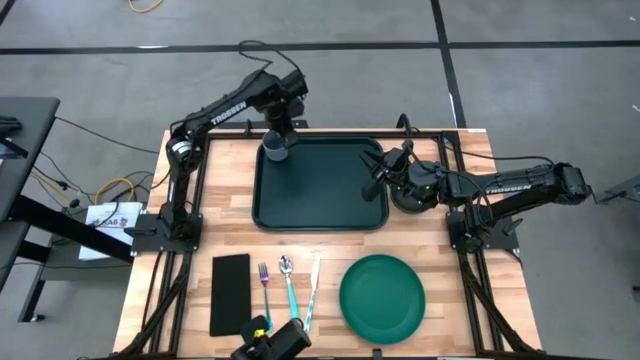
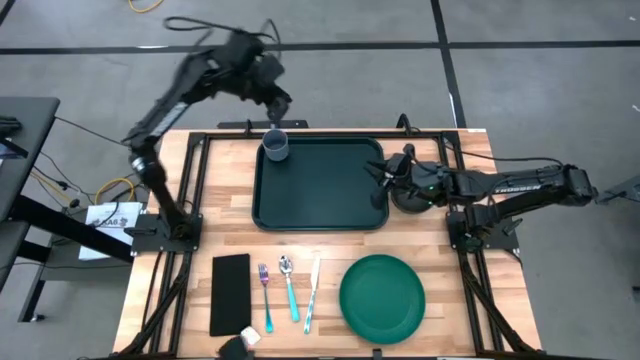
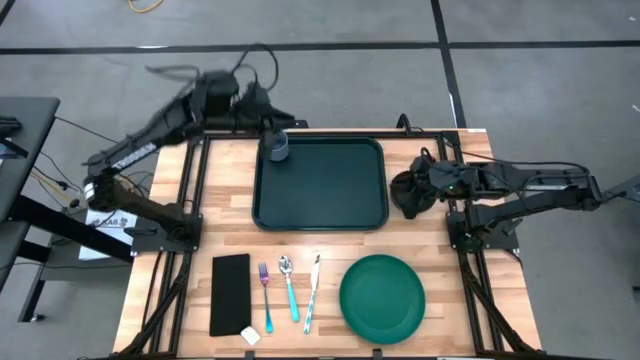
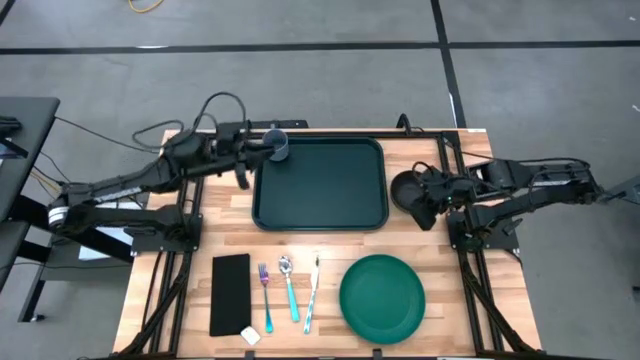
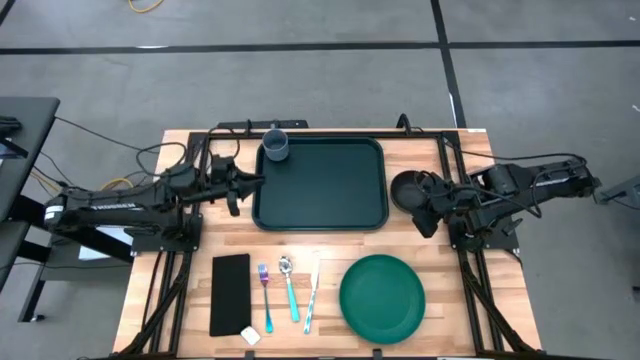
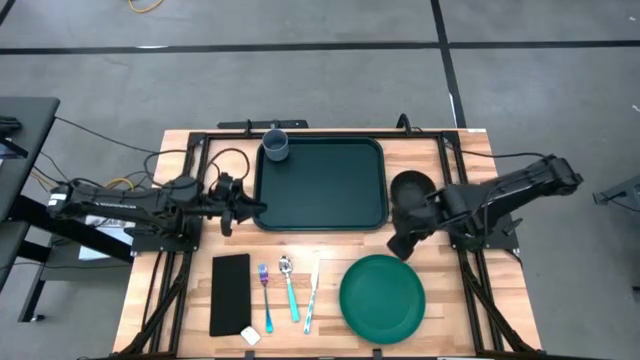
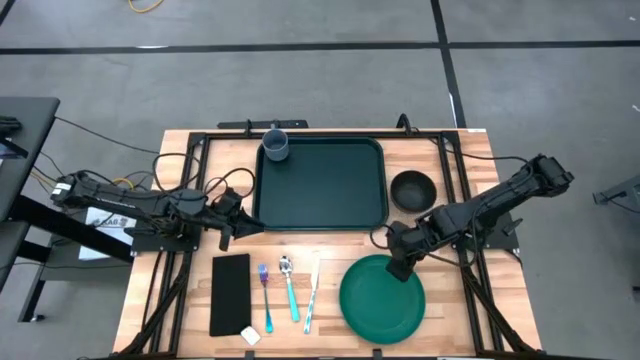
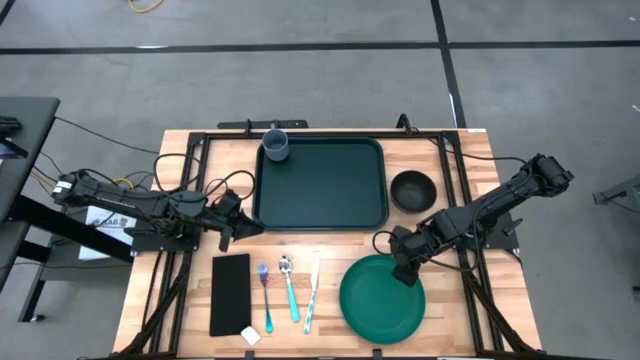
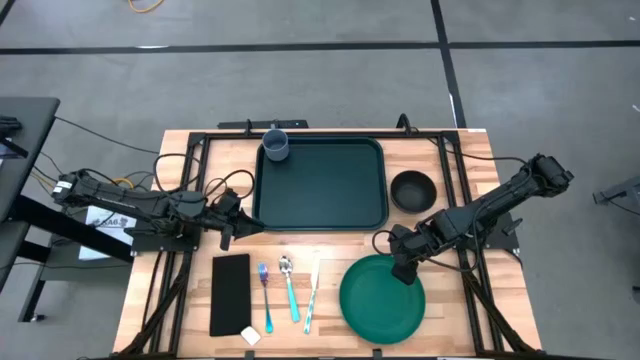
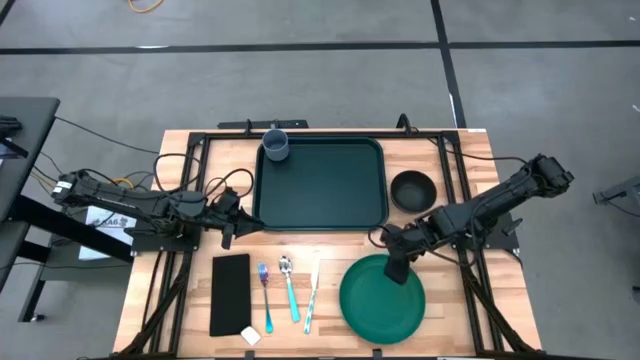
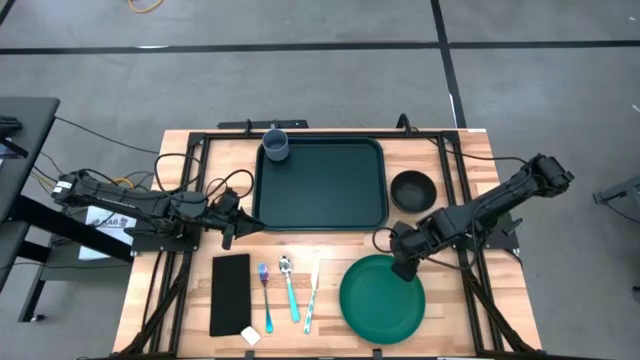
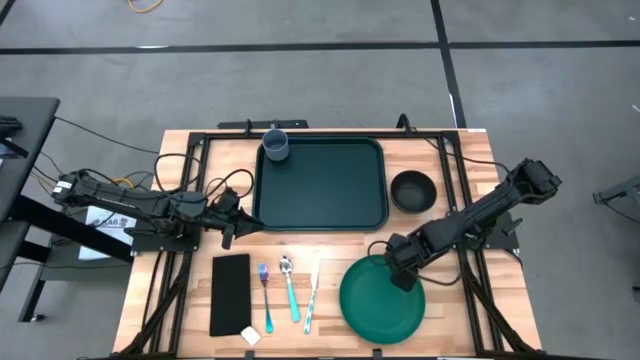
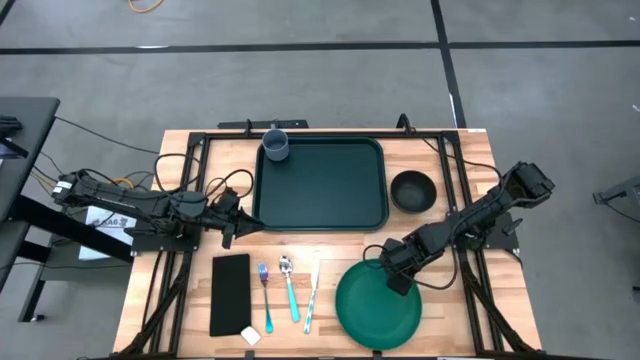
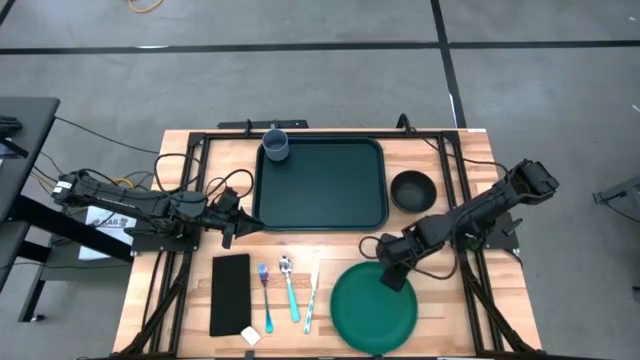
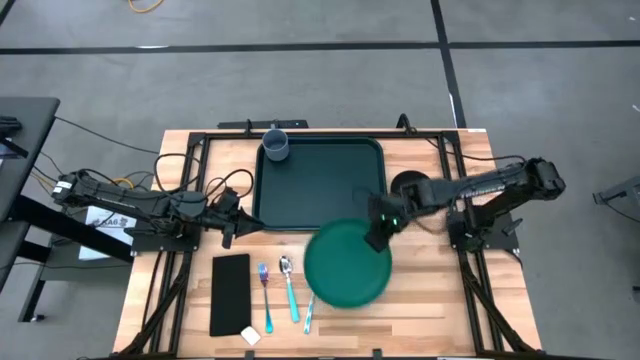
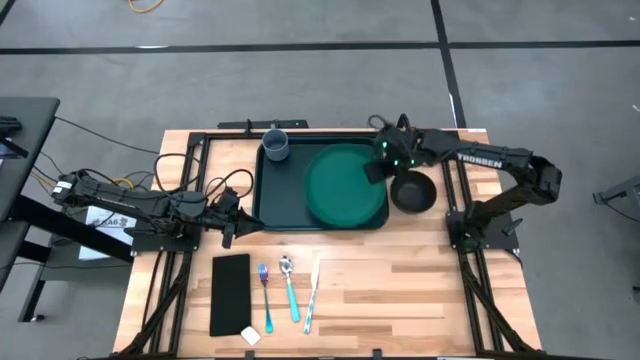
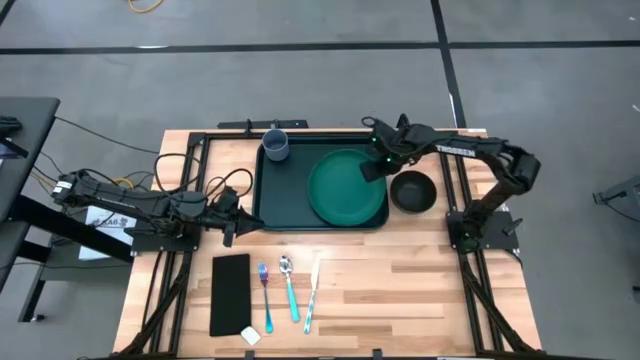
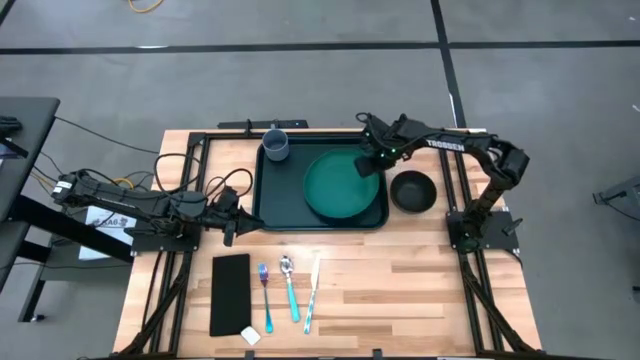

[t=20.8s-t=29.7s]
Task: Set up tray
Put the green plate in the center of the dark green tray

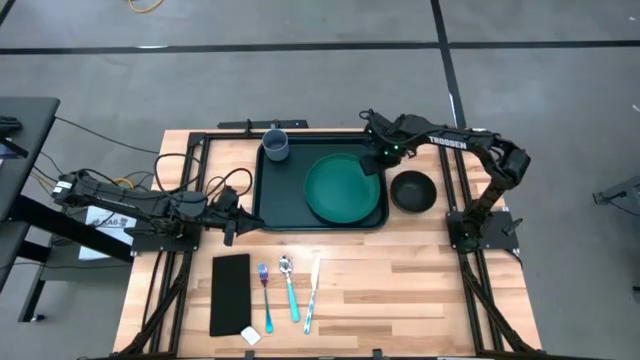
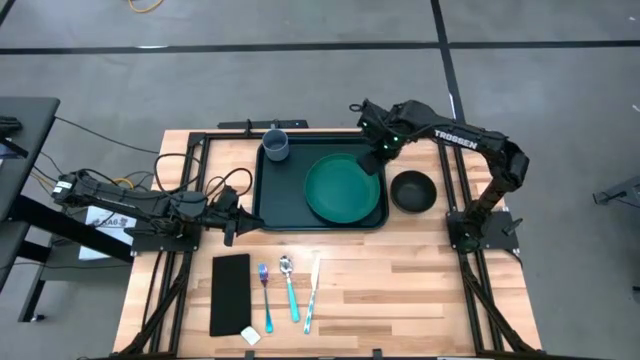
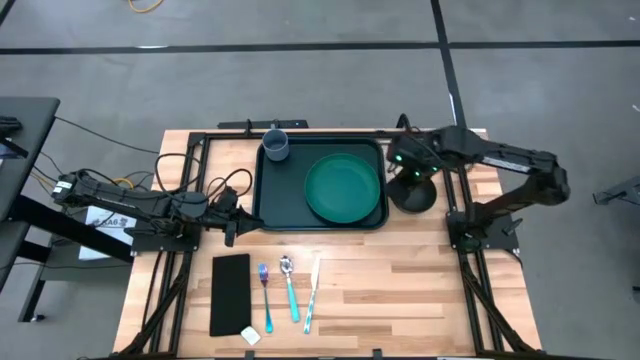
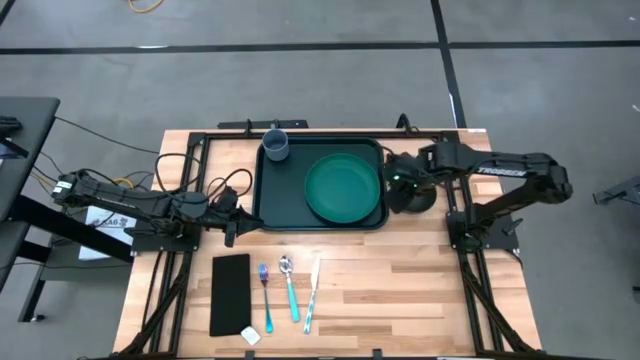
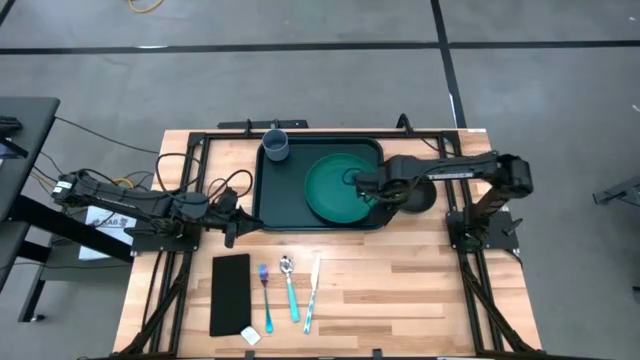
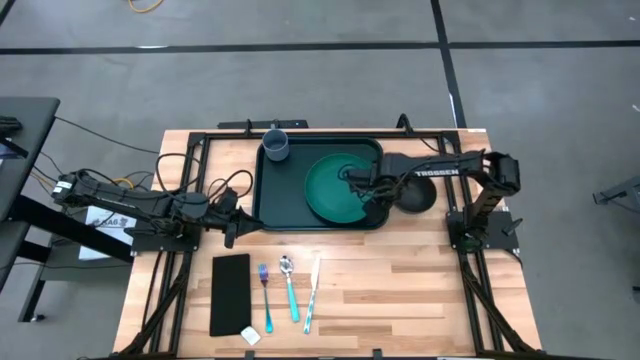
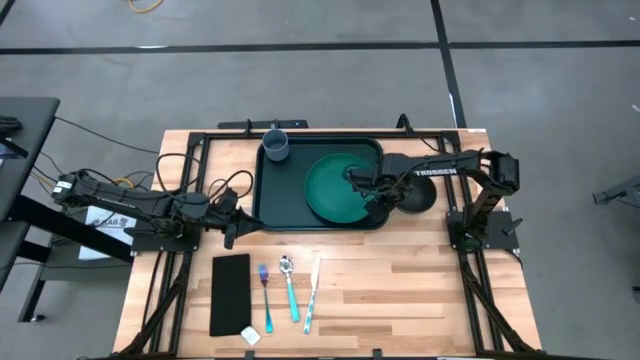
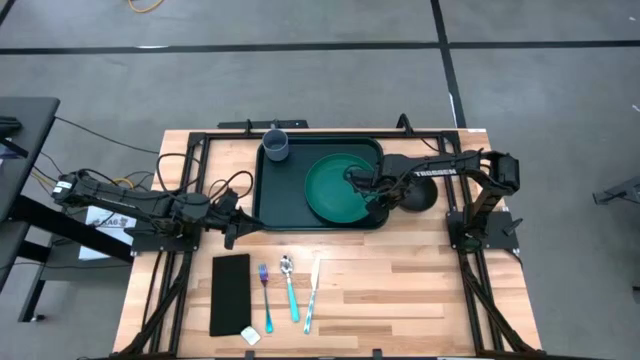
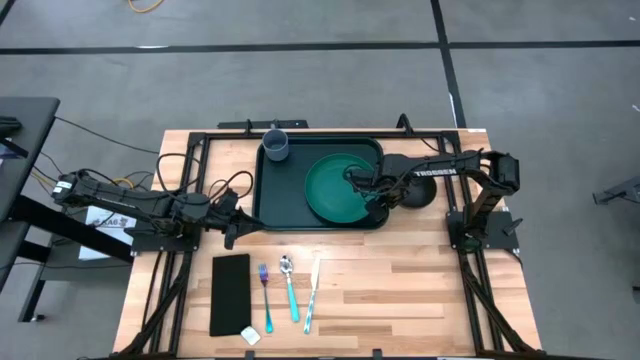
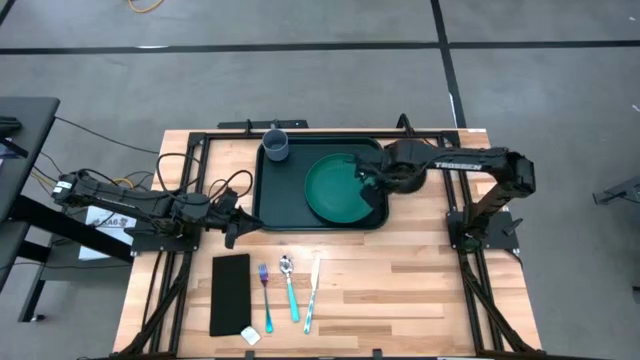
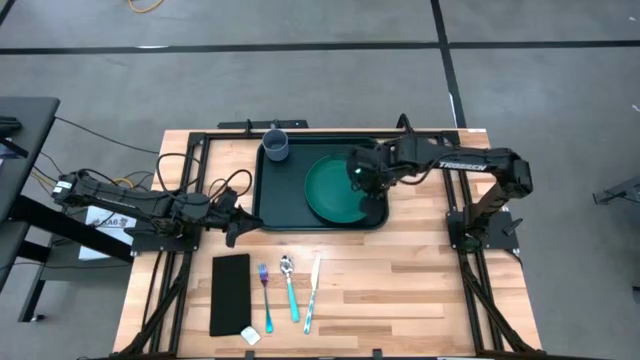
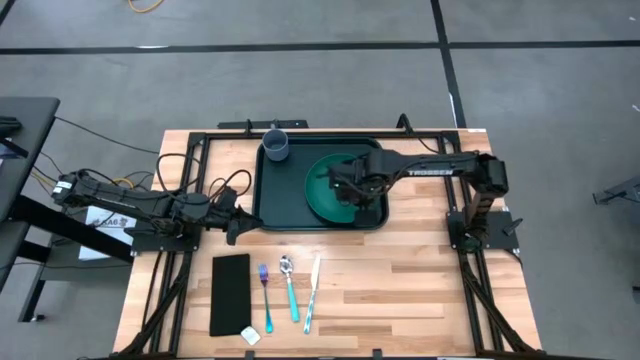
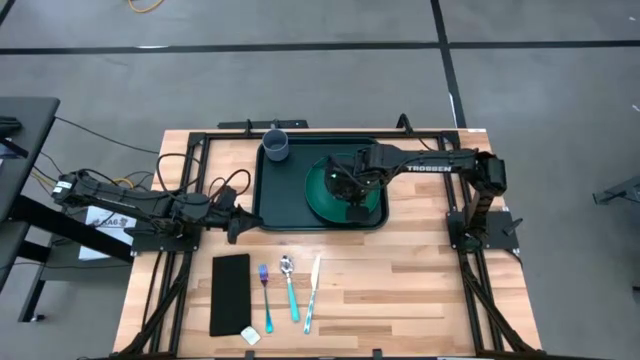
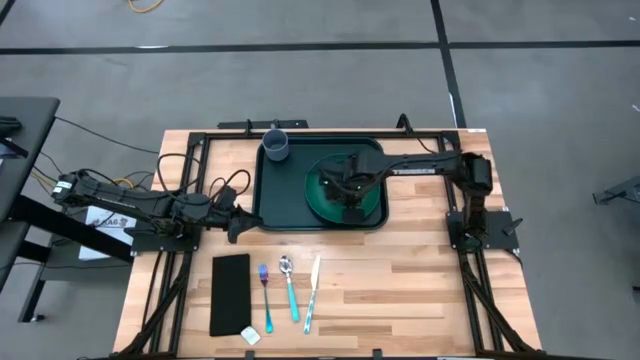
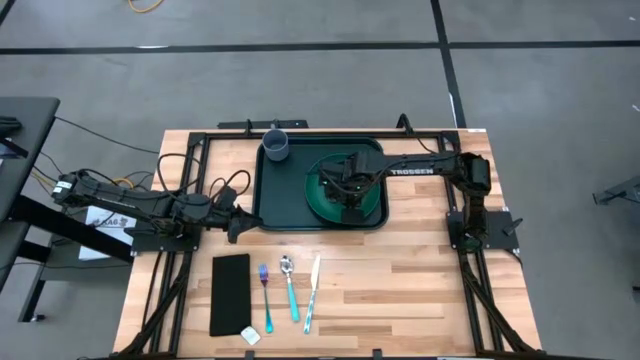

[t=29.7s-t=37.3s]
Put the black bowl on the green plate on the dark green tray
